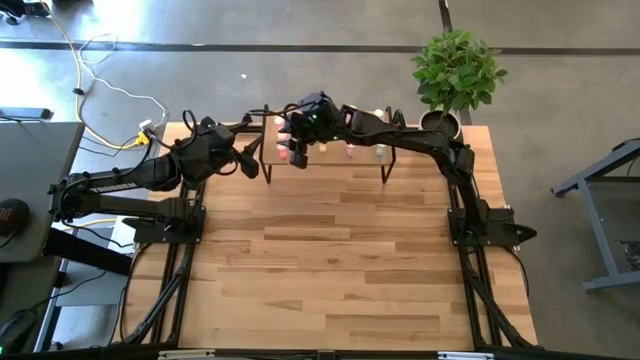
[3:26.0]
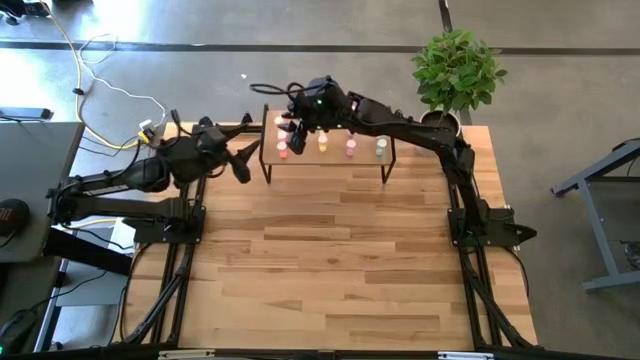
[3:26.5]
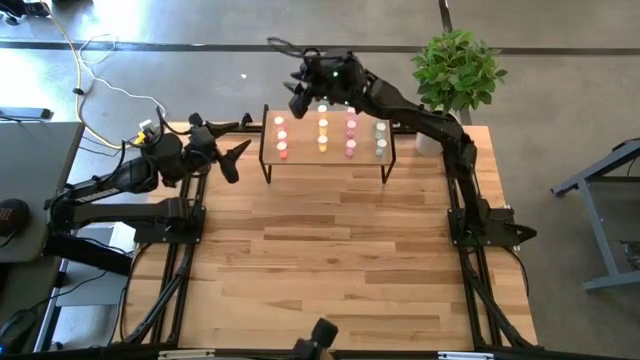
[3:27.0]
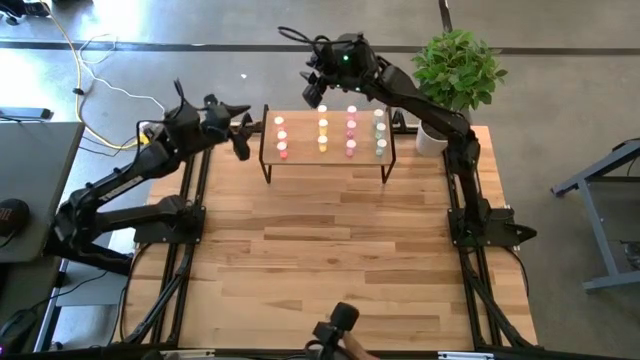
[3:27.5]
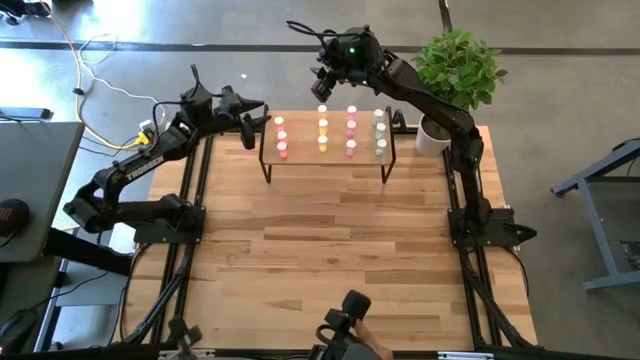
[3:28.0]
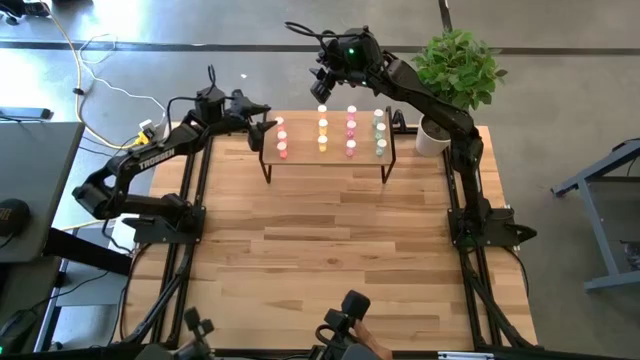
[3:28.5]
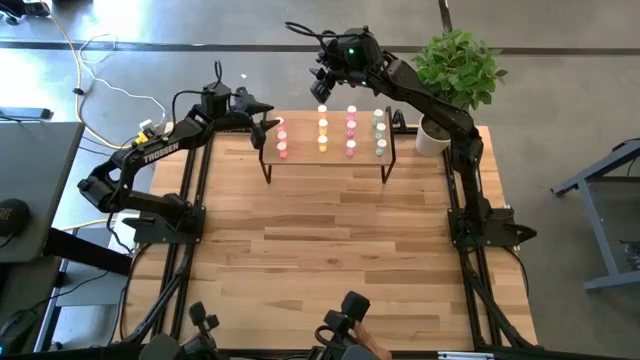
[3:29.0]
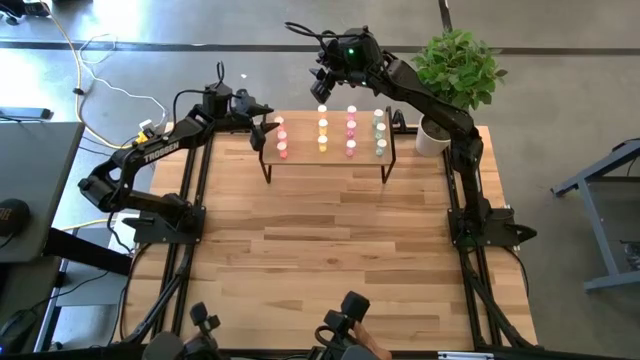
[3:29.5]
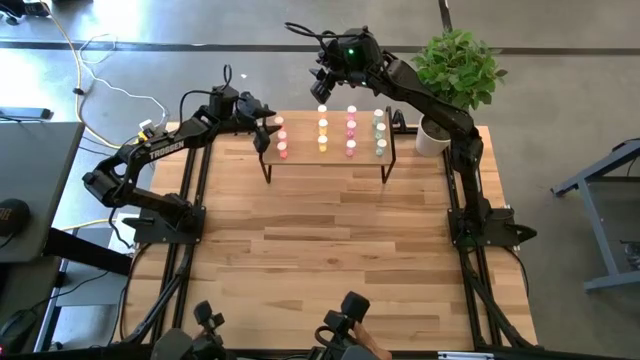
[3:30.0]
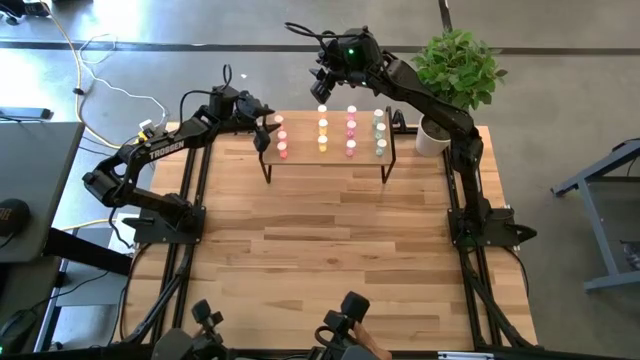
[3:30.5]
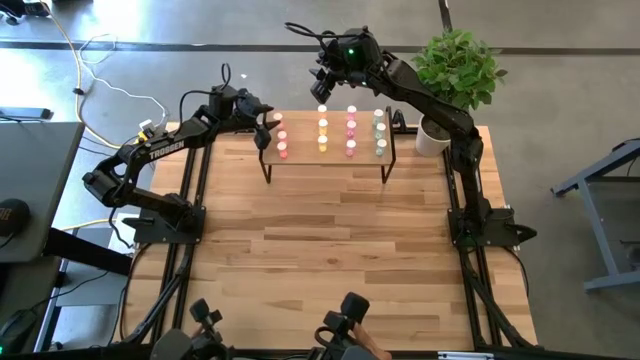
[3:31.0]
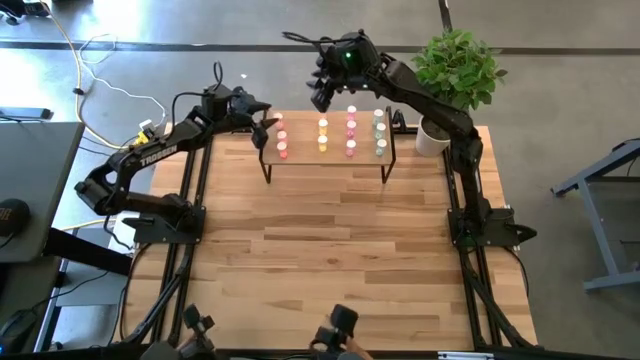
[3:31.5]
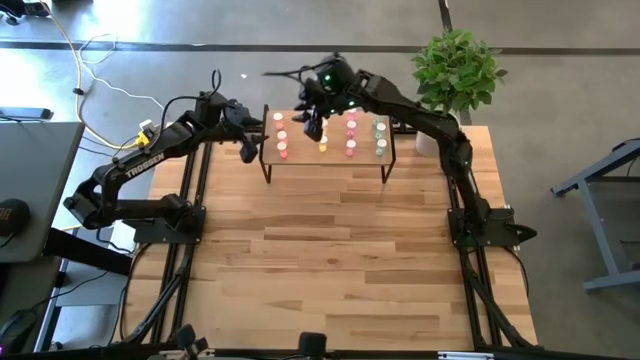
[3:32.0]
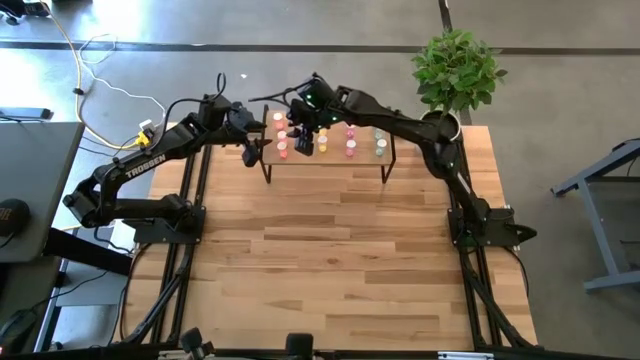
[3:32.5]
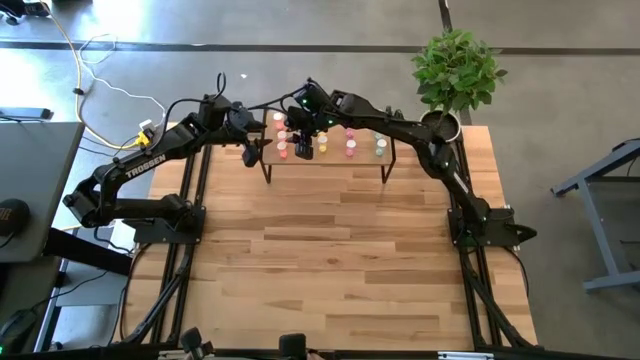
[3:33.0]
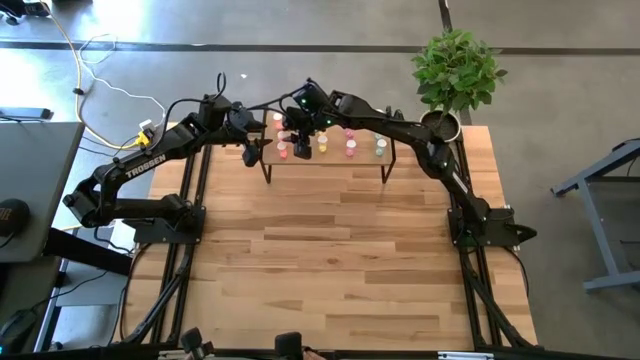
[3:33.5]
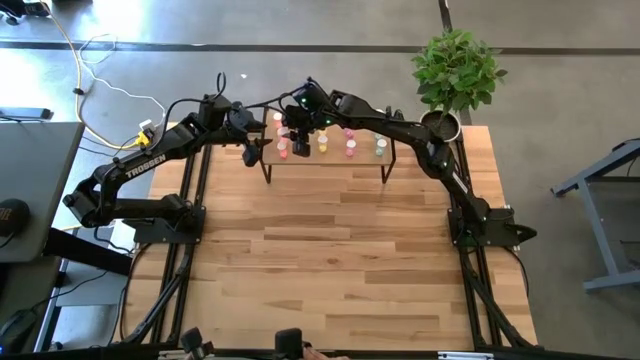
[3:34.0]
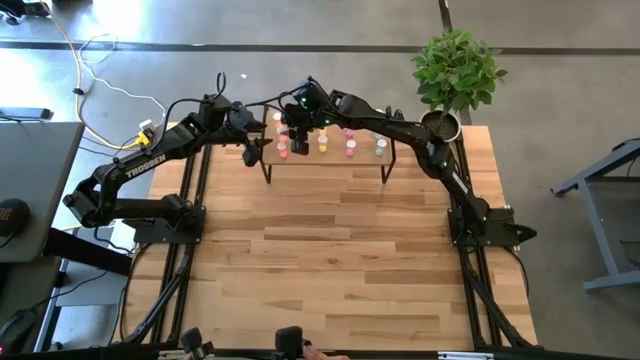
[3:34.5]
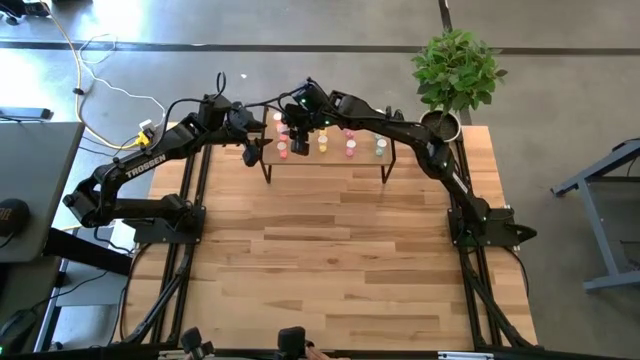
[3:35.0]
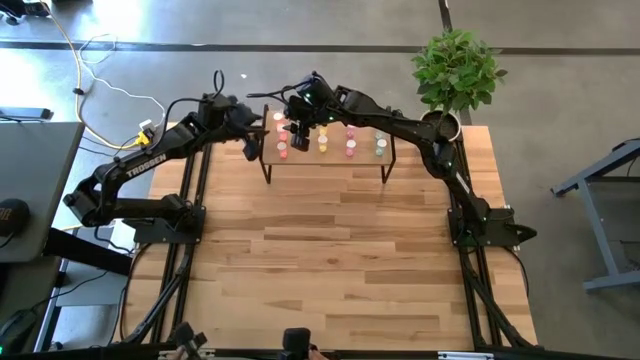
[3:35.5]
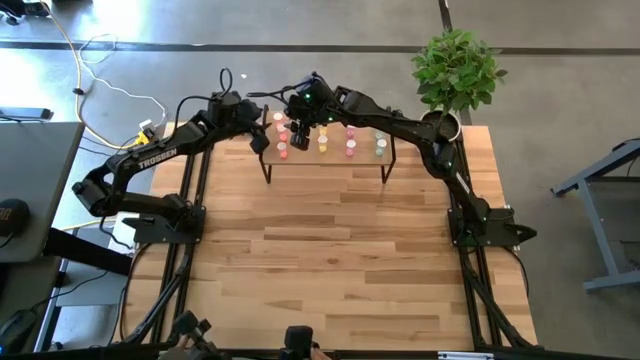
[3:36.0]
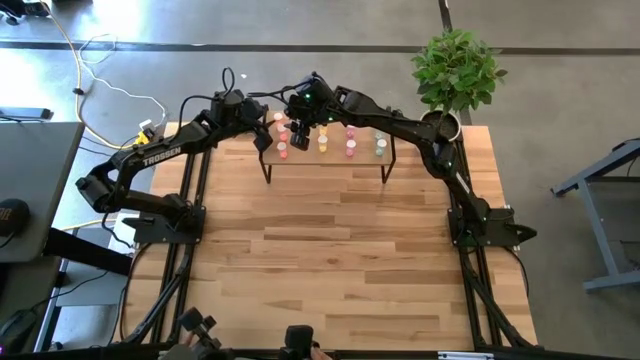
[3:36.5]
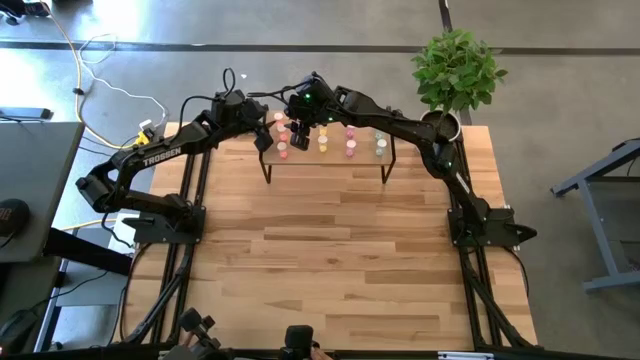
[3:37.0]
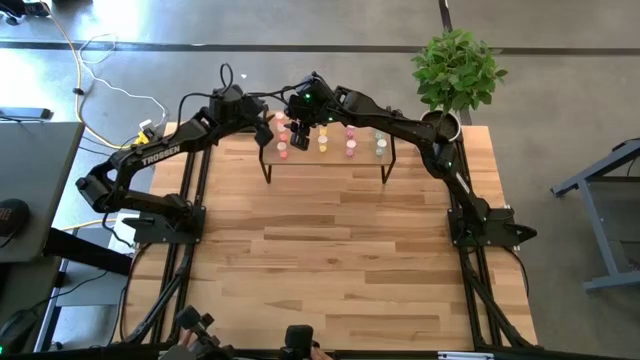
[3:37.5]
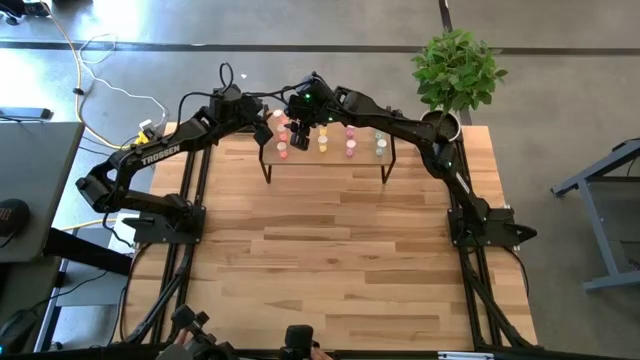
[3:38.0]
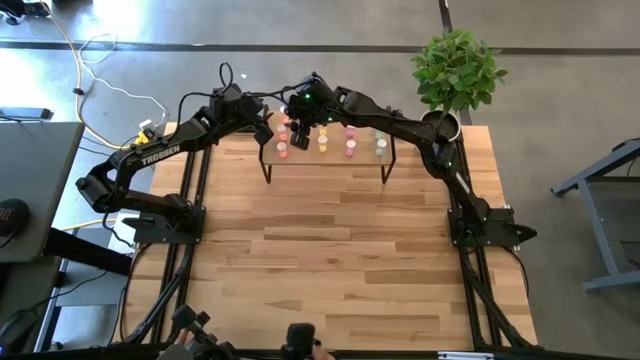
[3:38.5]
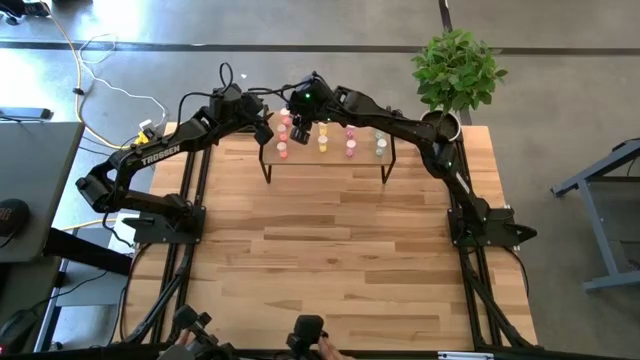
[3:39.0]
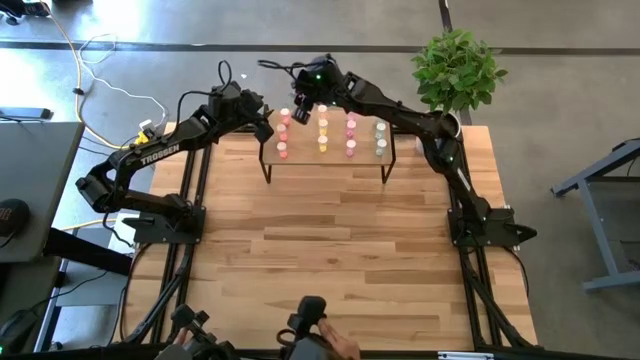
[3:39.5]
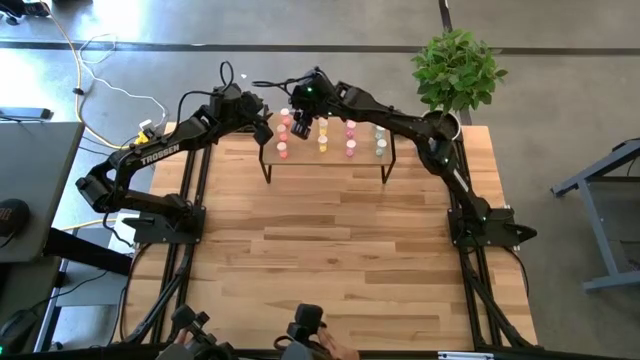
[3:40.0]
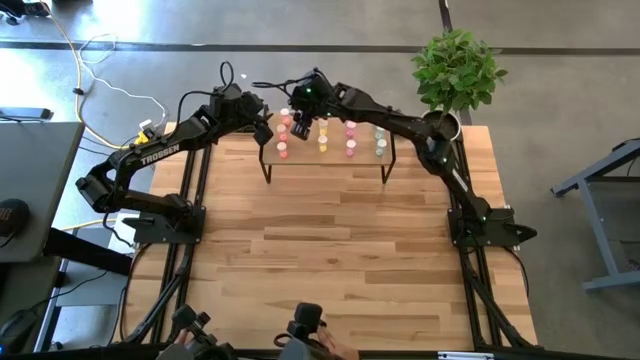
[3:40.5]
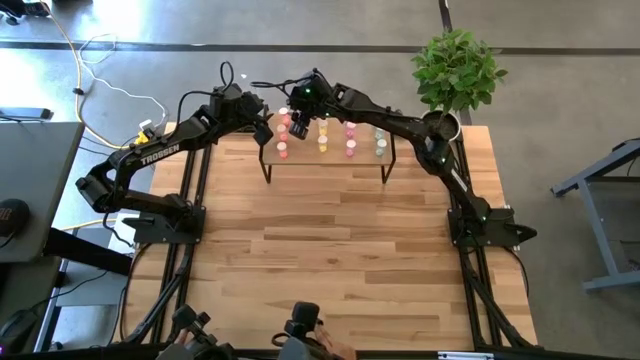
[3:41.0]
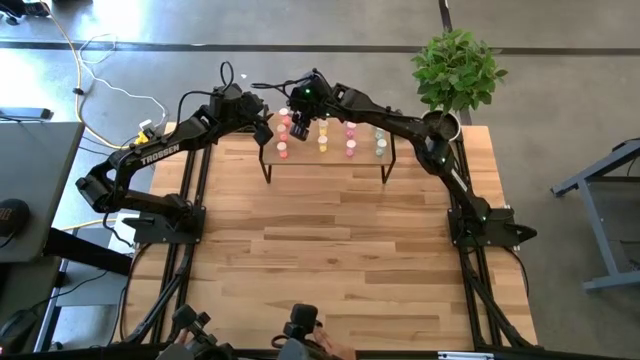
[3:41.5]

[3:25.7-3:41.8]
Task: Pick and place medicine bottles onto shelf by color
Adjust the pink pill bottles on the shelf

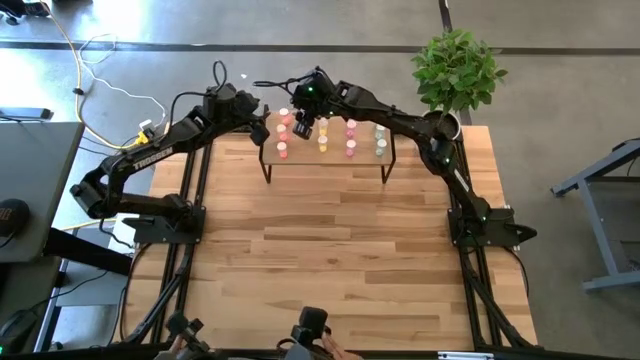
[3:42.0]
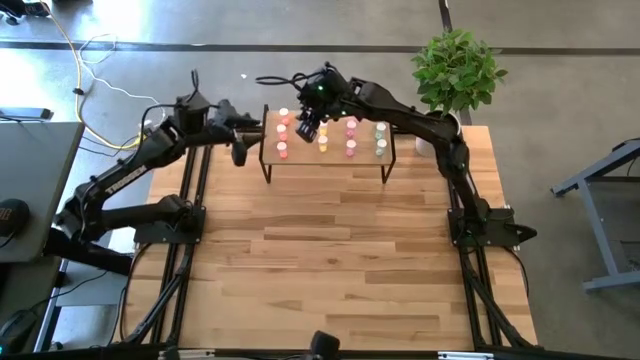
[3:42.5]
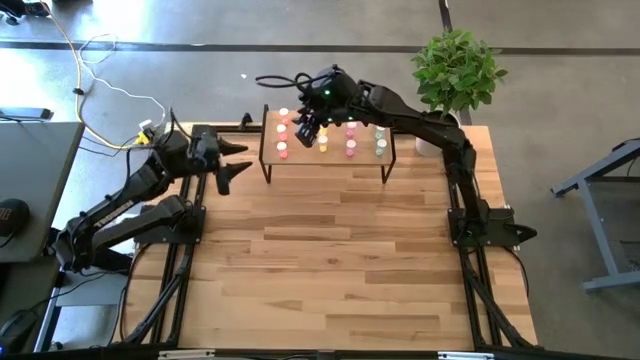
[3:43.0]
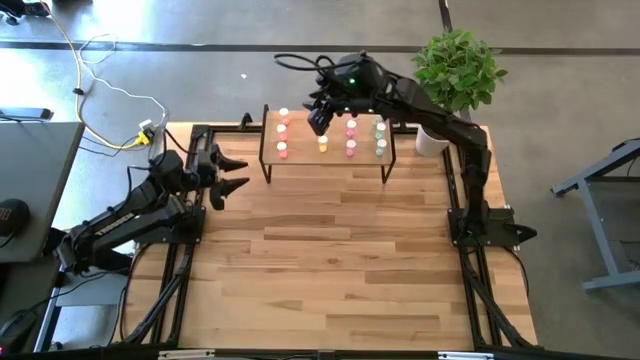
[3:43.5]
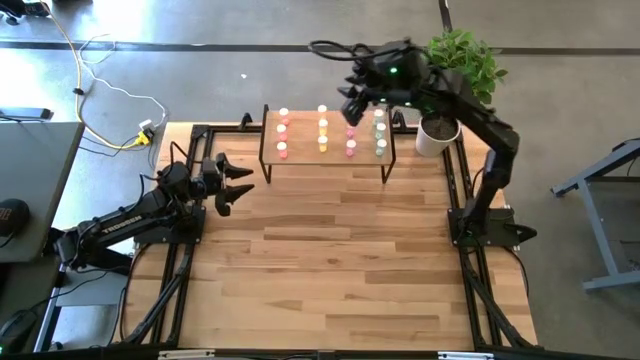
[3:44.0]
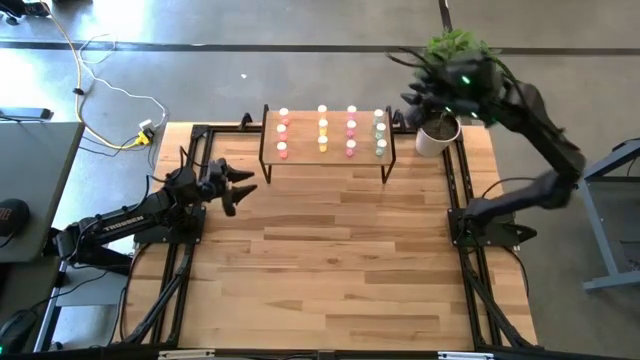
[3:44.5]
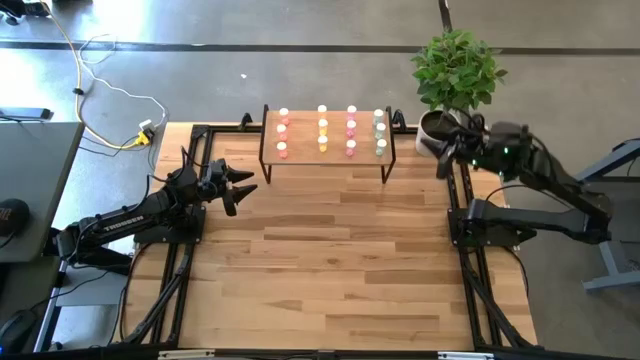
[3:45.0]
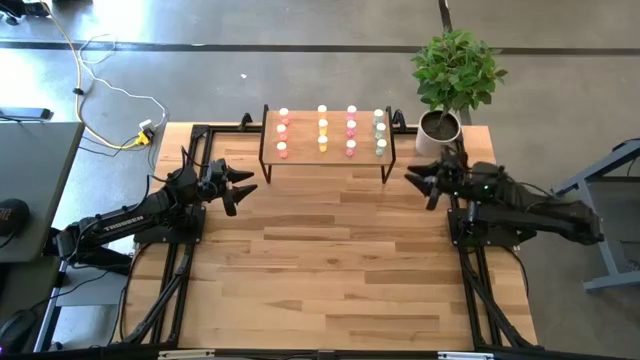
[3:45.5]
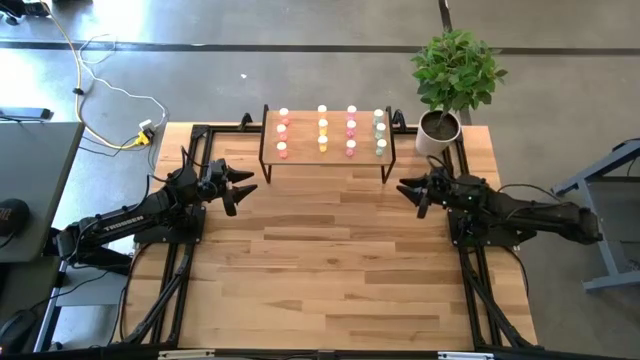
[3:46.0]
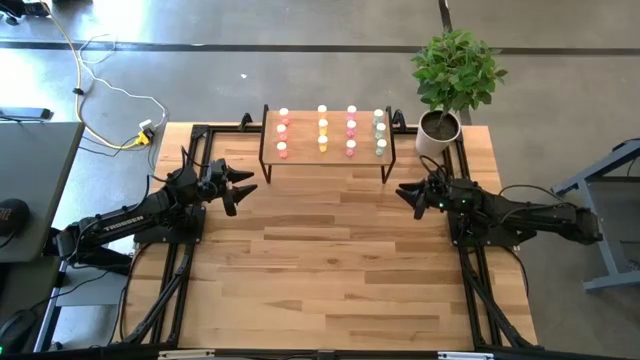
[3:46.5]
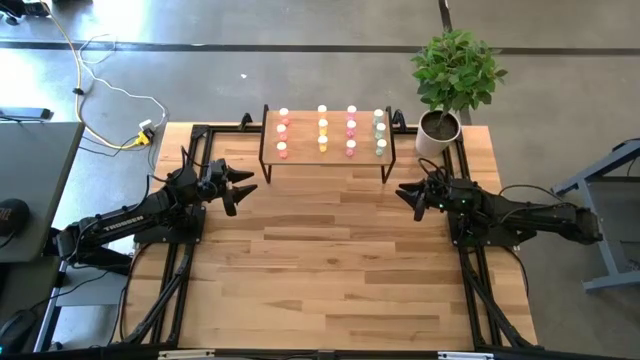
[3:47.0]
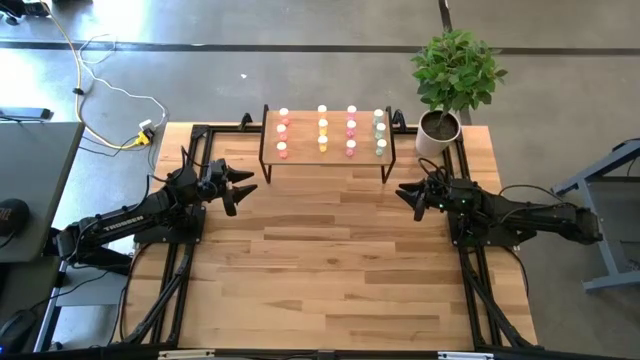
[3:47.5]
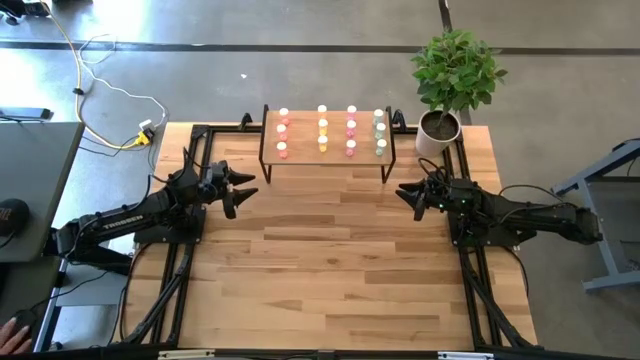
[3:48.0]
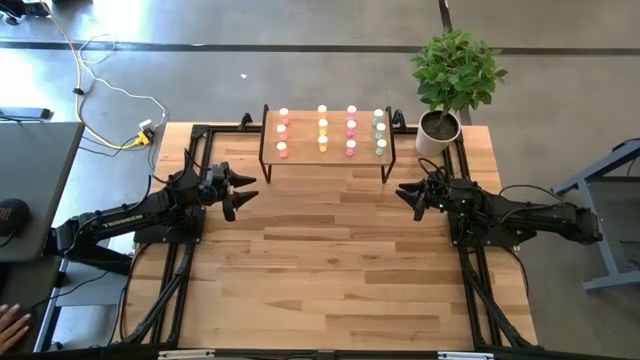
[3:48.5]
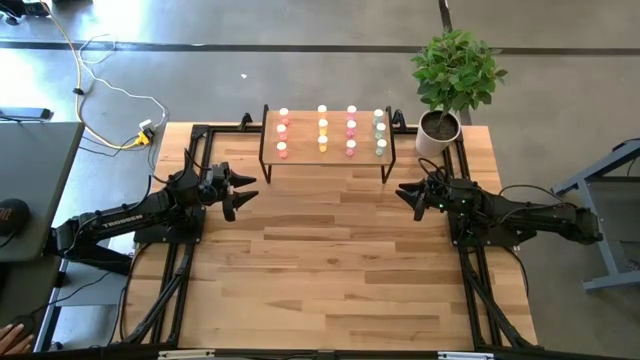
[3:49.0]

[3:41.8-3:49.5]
Return to Home Position
